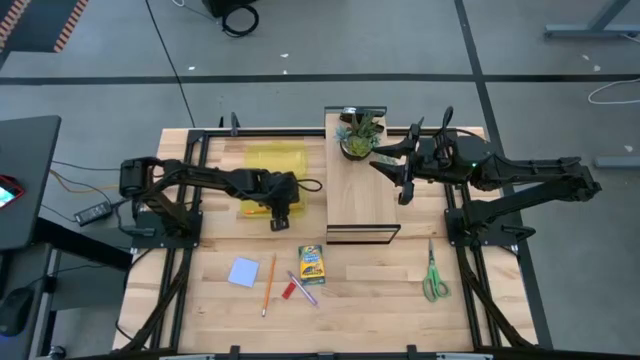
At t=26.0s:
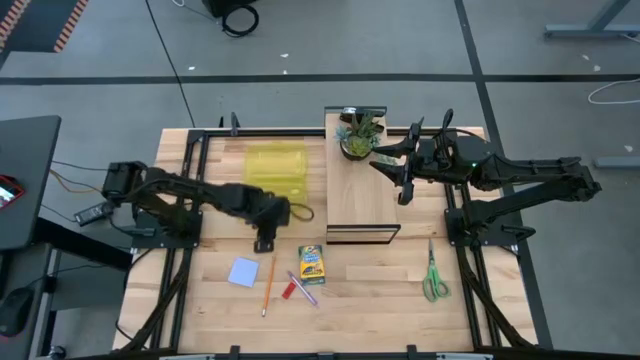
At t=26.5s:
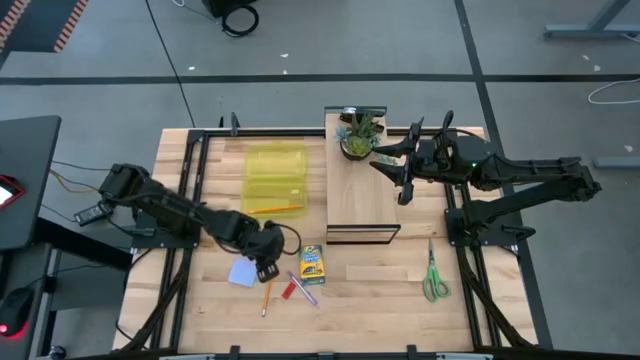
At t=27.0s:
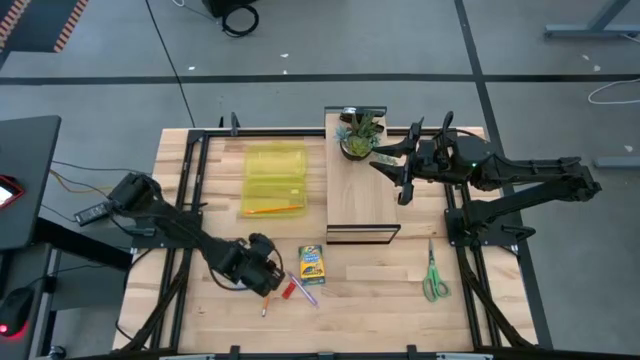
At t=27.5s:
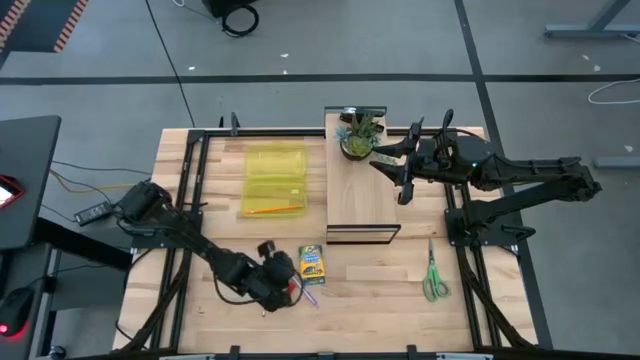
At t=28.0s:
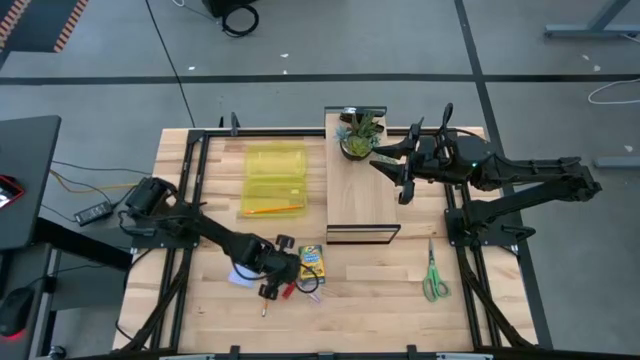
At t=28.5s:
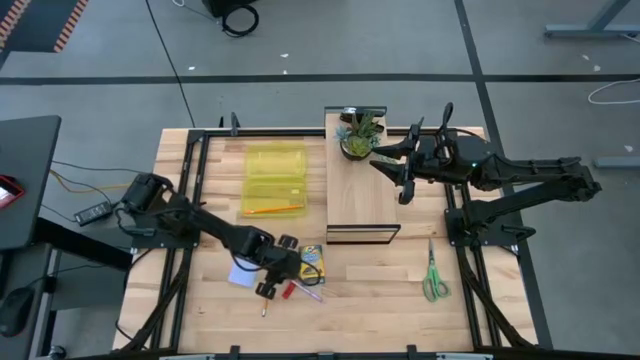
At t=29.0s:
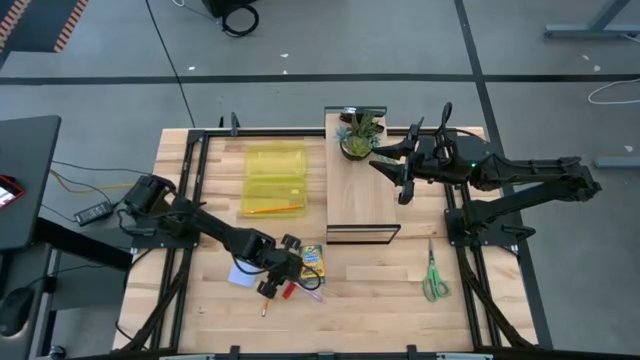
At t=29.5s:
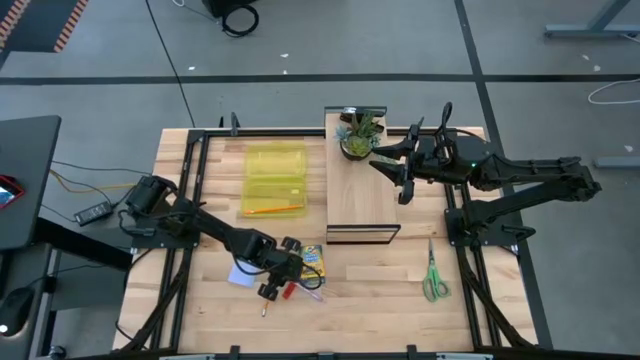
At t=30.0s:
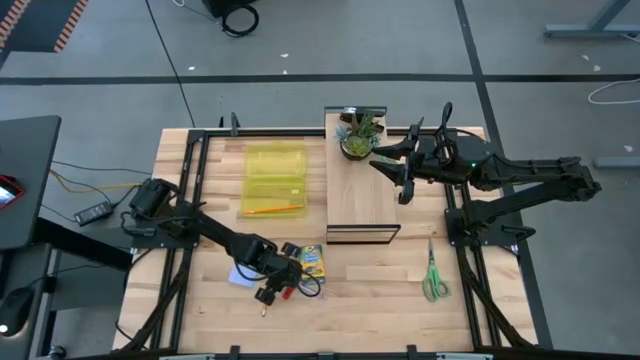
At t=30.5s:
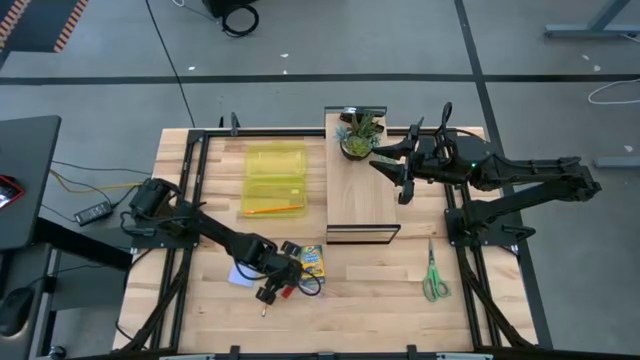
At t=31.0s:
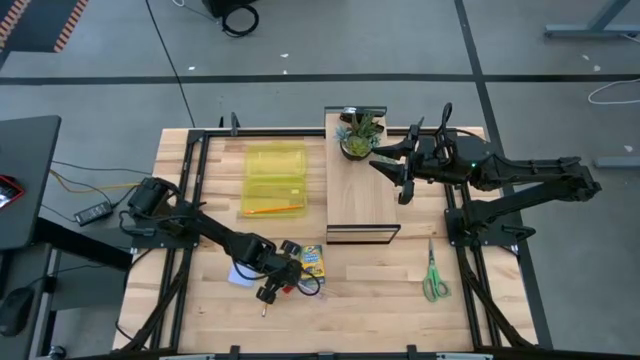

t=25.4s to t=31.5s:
Task: Pack school essentials
Put the violet pen into the yellow supply box

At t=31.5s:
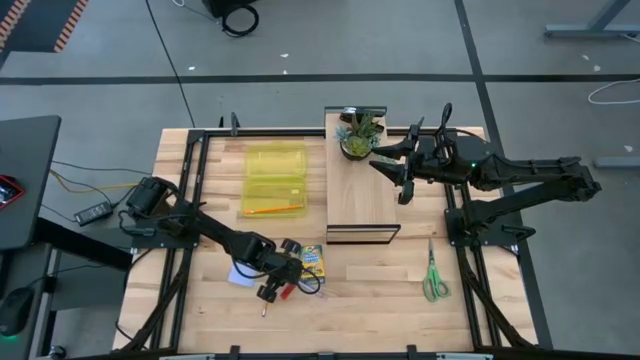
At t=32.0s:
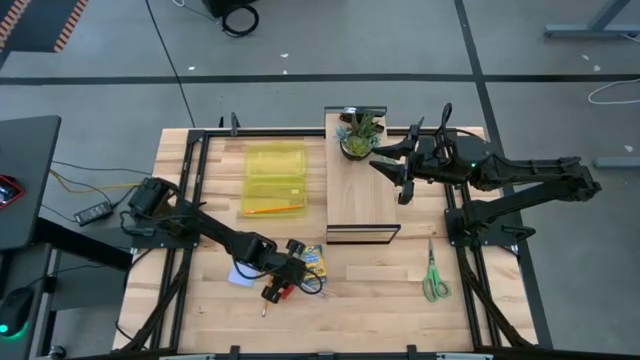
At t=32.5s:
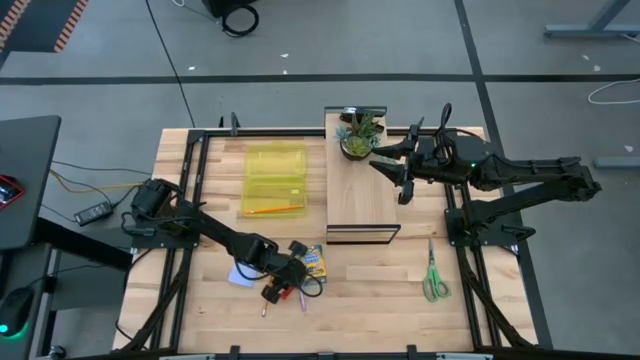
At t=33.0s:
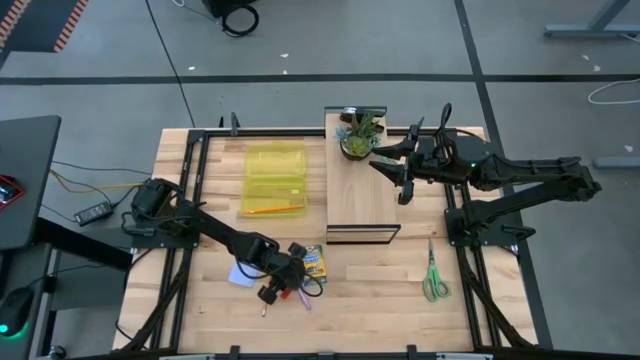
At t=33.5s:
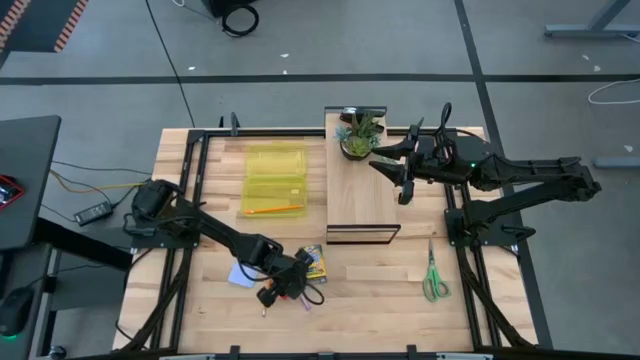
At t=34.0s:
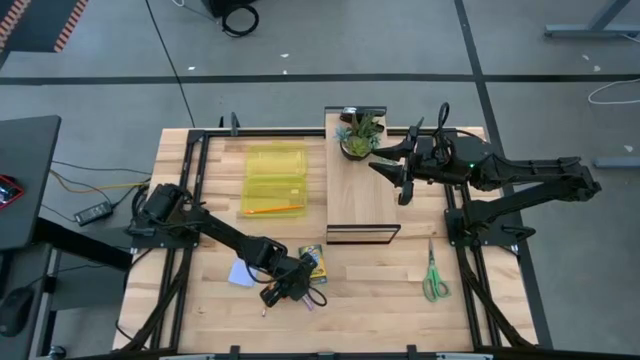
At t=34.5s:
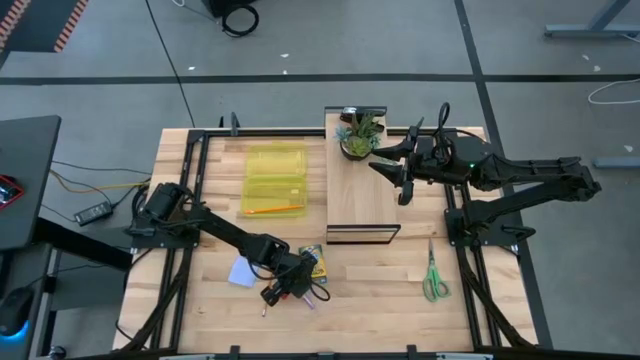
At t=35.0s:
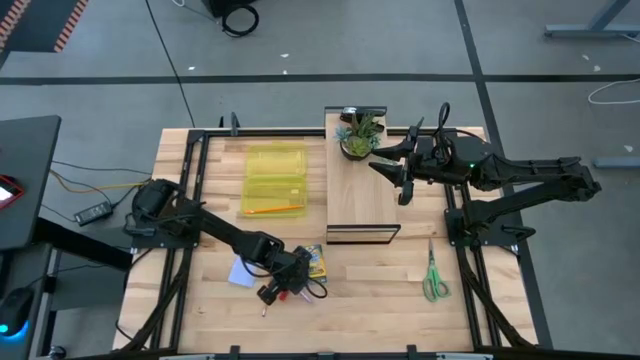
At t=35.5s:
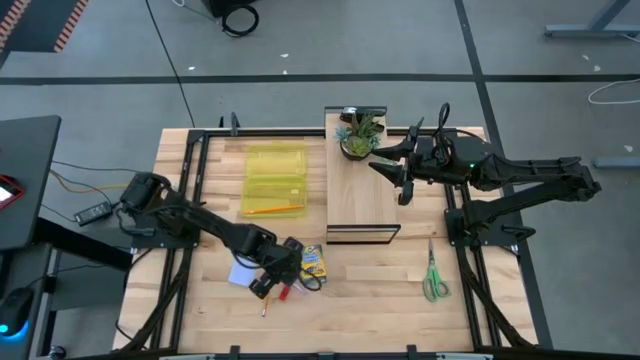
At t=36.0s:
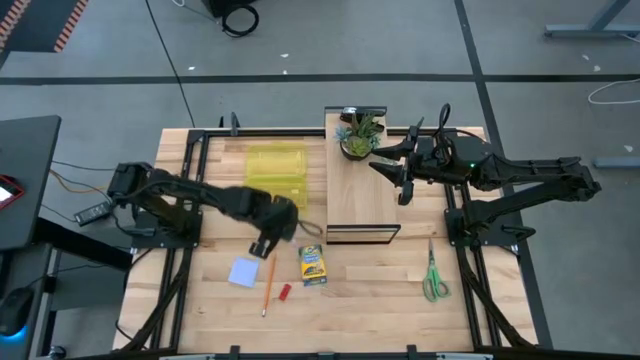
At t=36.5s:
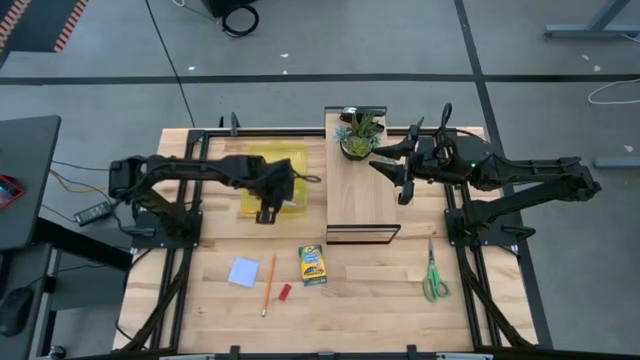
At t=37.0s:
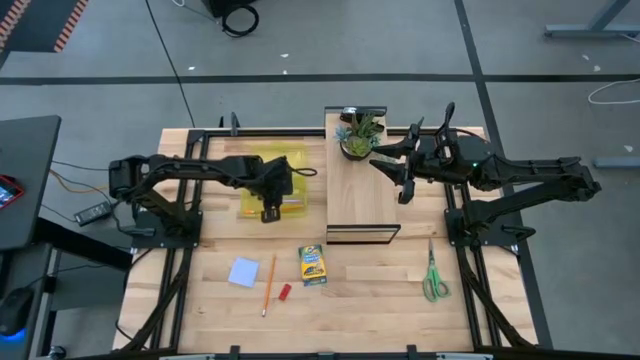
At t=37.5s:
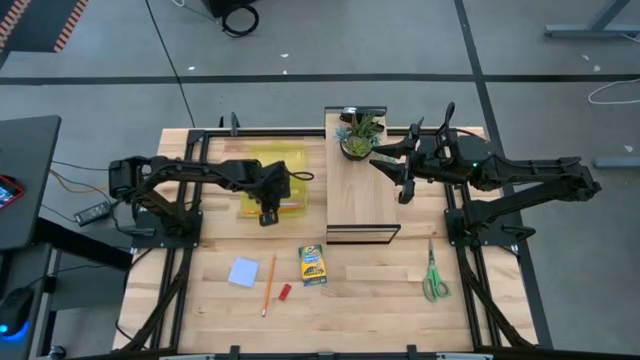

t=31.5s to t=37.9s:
Put the violet pen into the yellow supply box

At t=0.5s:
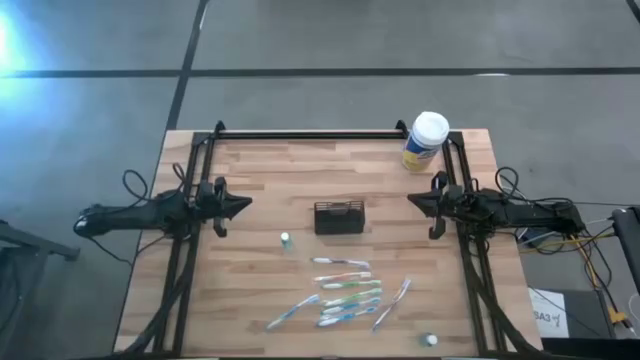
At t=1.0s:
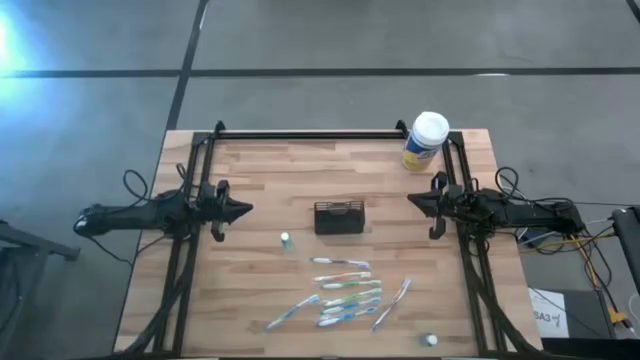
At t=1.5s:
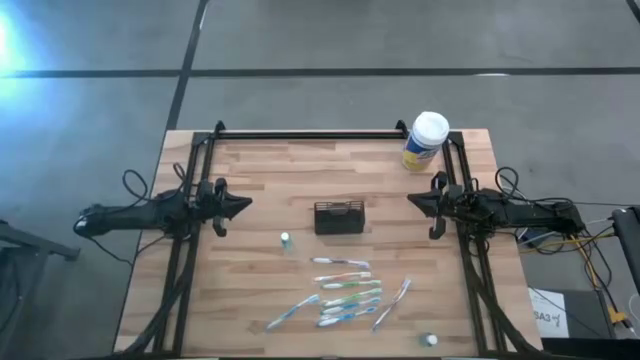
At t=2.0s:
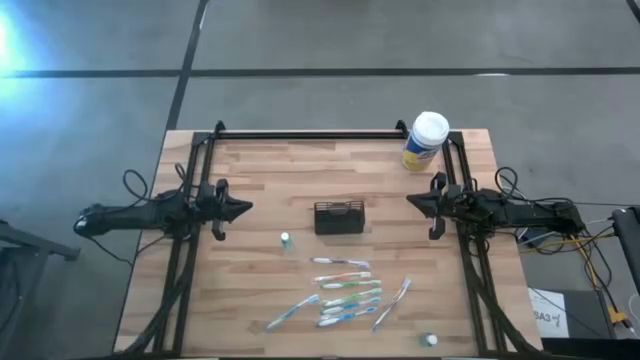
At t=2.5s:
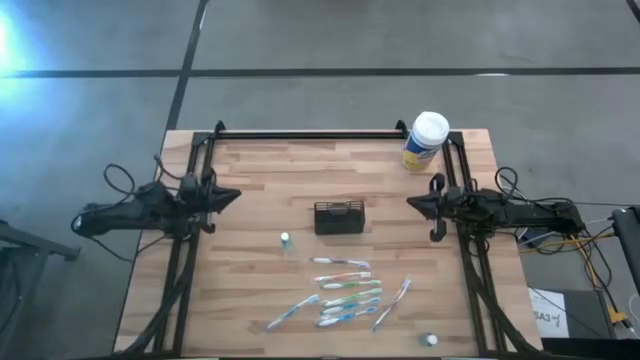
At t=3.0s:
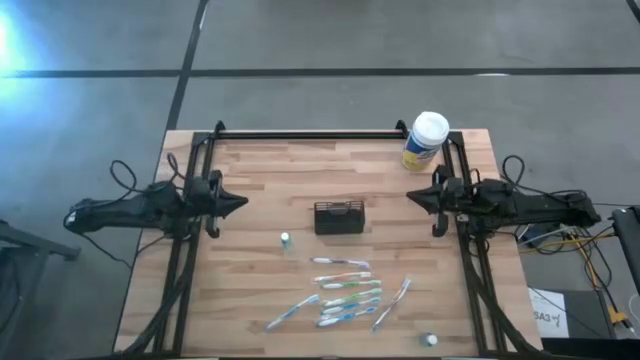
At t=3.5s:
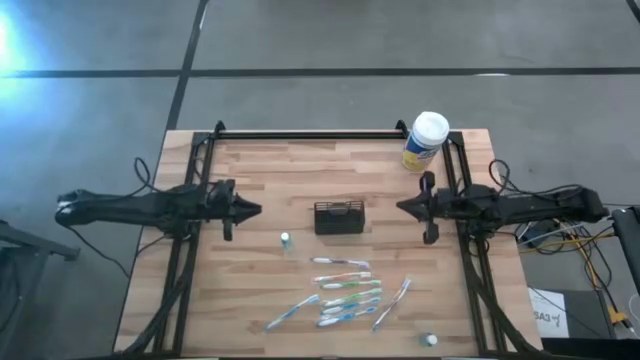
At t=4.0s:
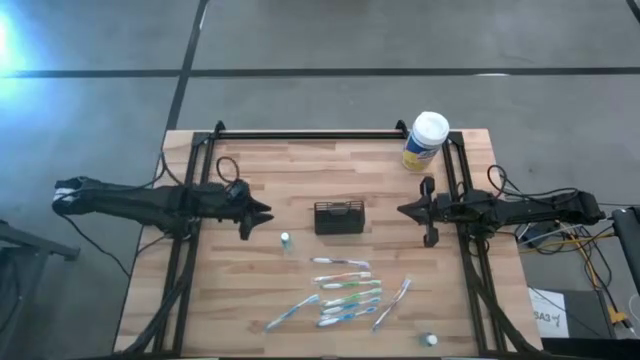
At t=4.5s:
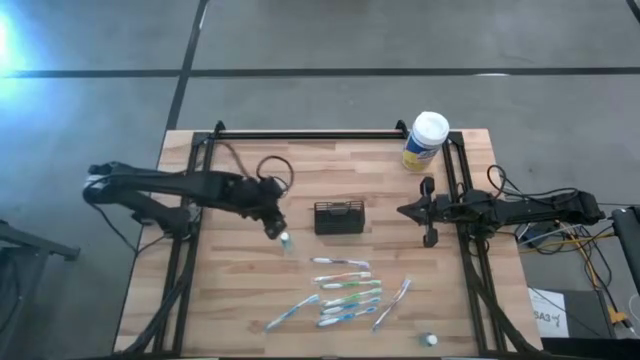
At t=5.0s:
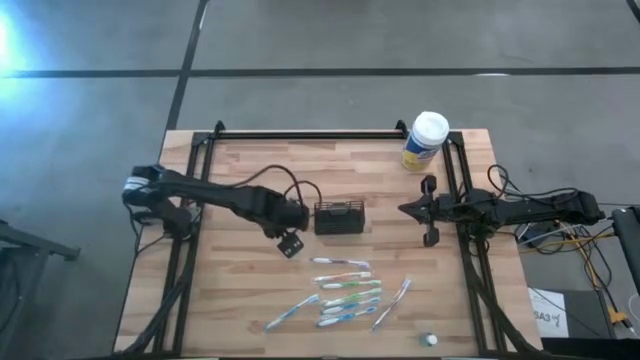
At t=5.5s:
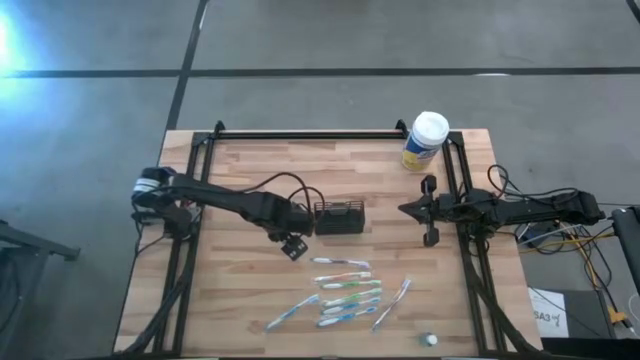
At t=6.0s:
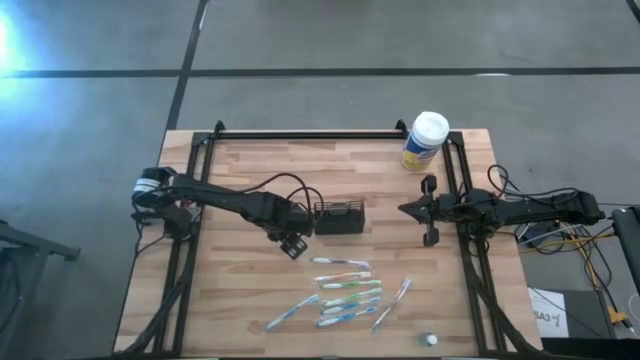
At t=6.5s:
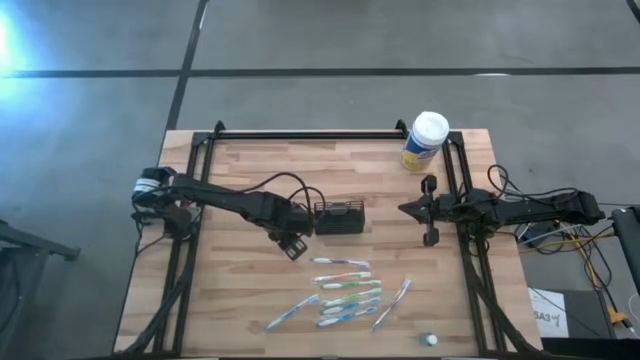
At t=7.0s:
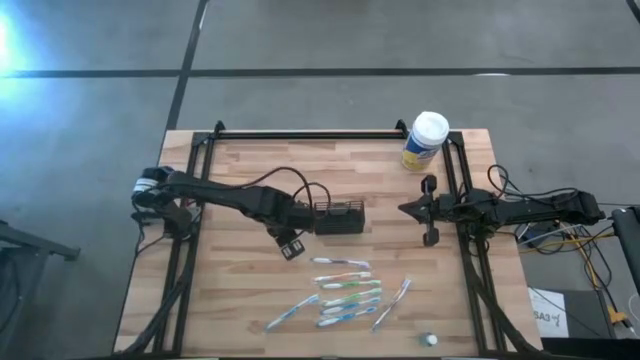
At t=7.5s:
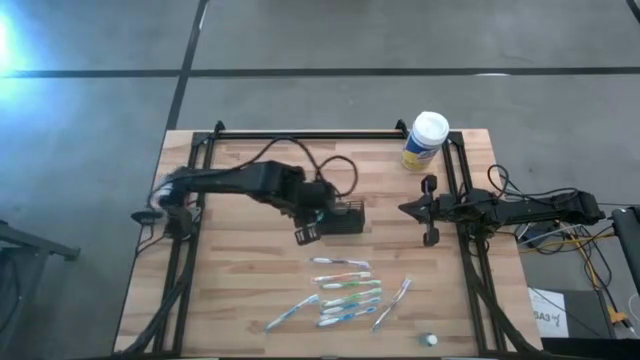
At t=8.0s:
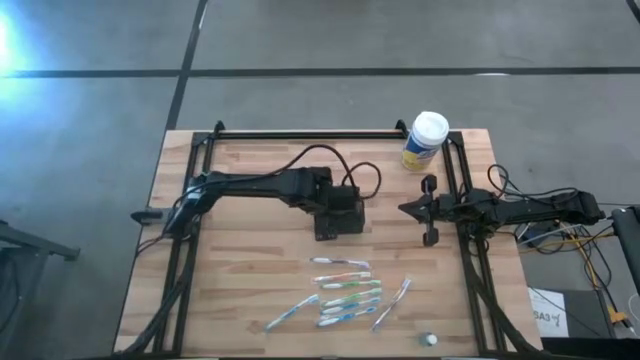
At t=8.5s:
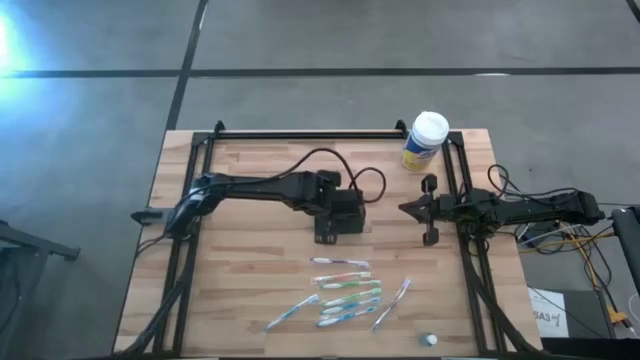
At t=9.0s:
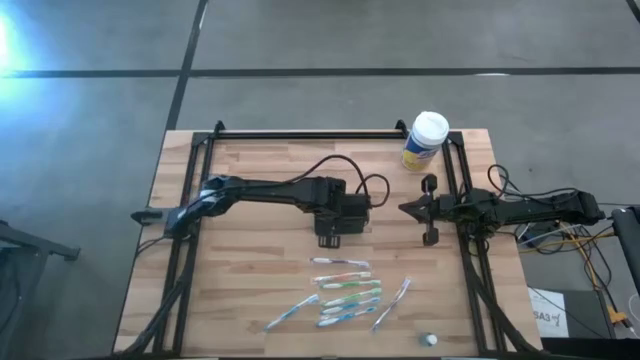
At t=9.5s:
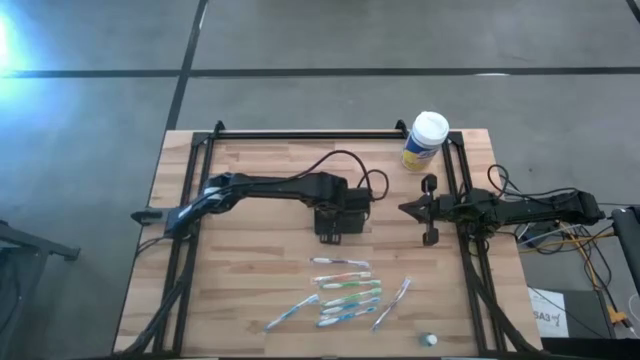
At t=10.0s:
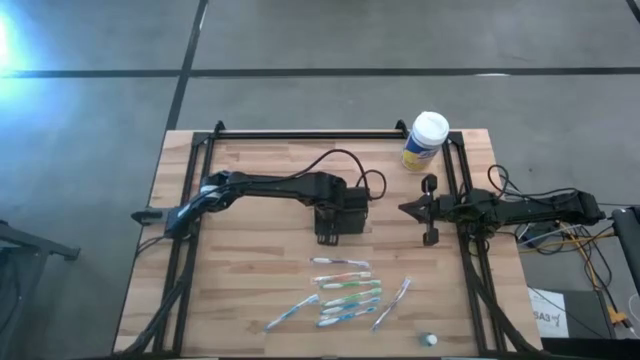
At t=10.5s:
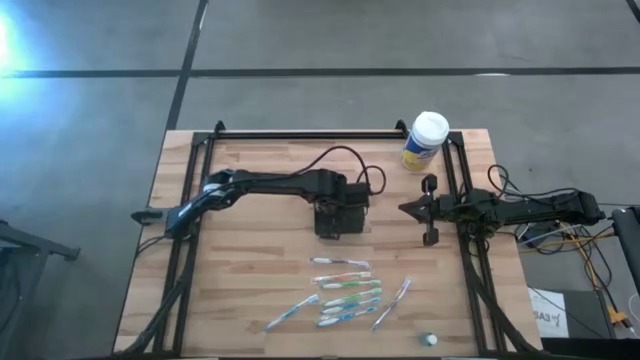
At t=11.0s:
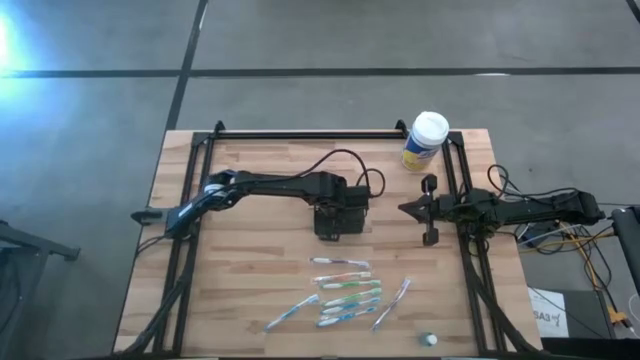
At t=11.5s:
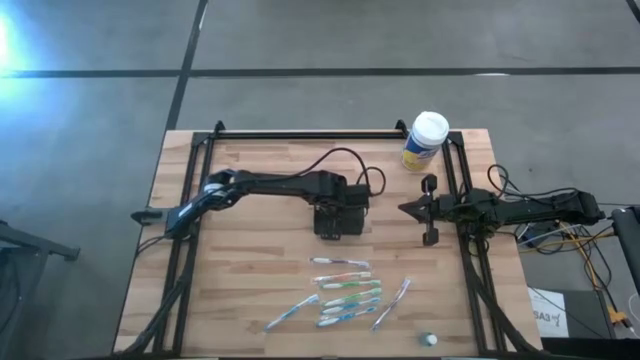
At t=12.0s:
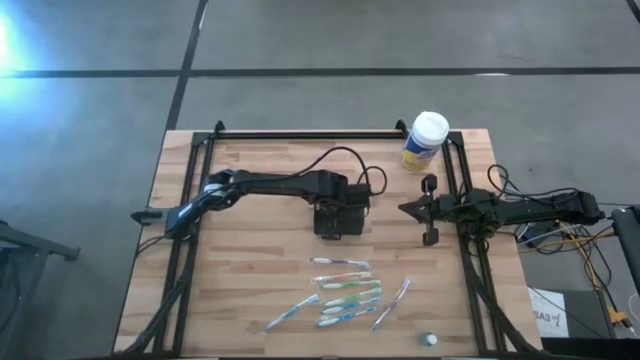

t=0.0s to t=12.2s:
Task: Pick & Place toothbrushing station
Put the top mouthwash bottle into the wire organizer
